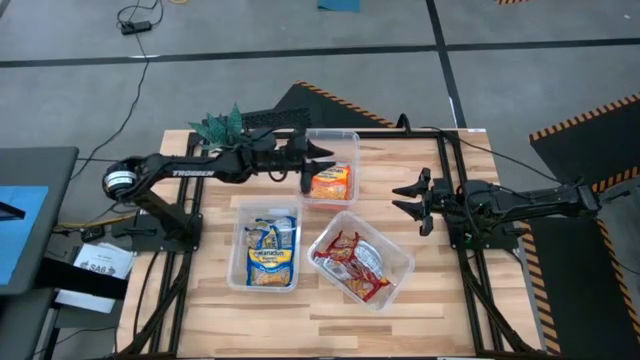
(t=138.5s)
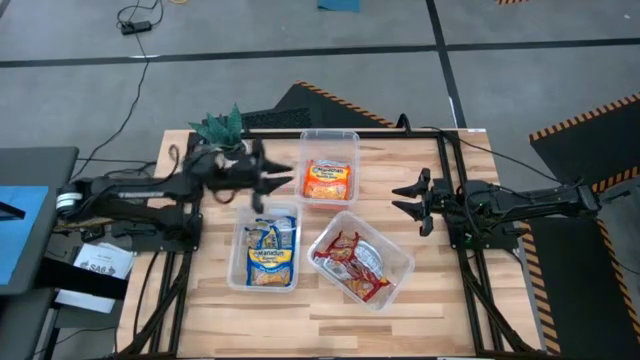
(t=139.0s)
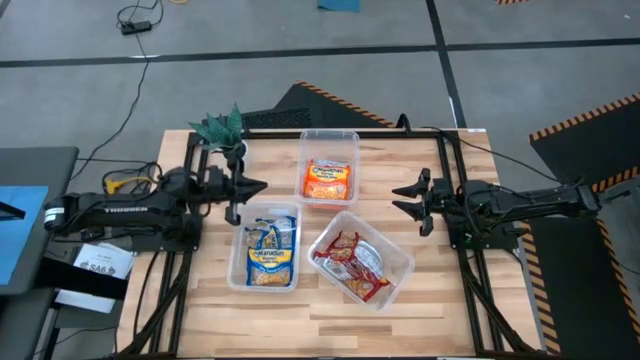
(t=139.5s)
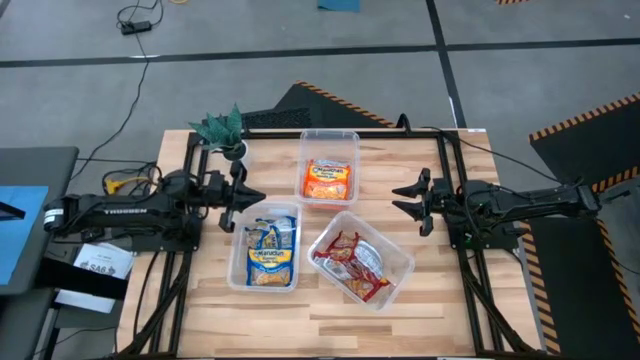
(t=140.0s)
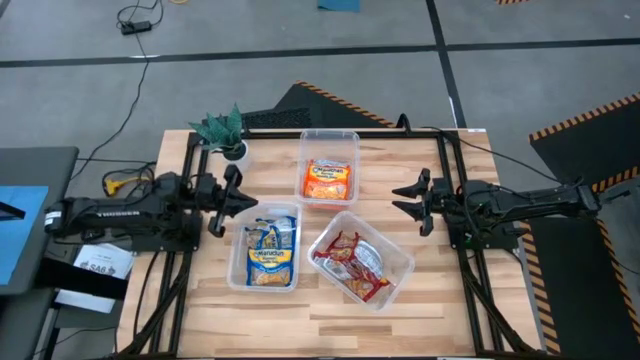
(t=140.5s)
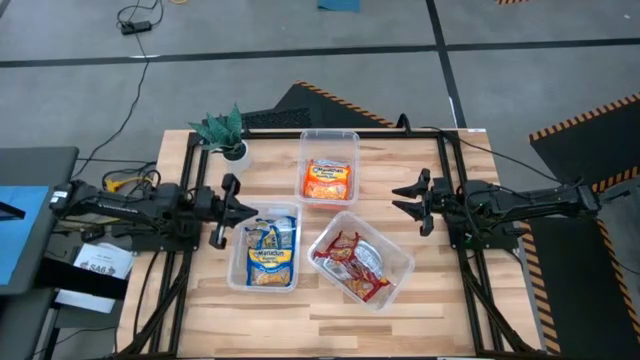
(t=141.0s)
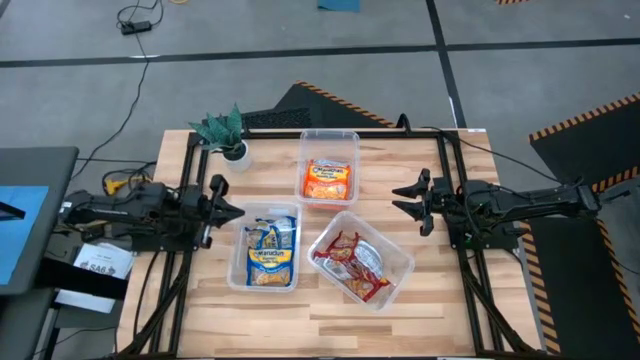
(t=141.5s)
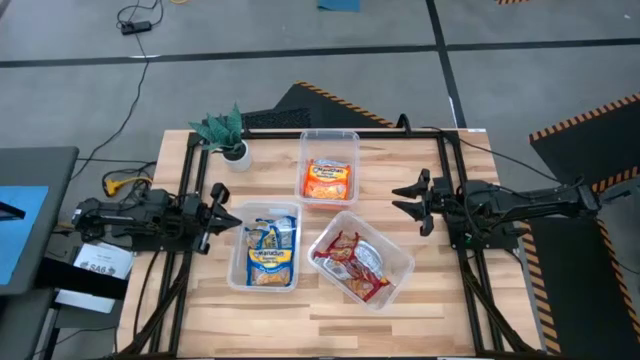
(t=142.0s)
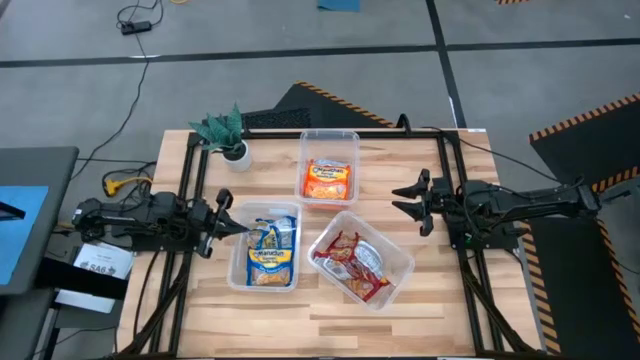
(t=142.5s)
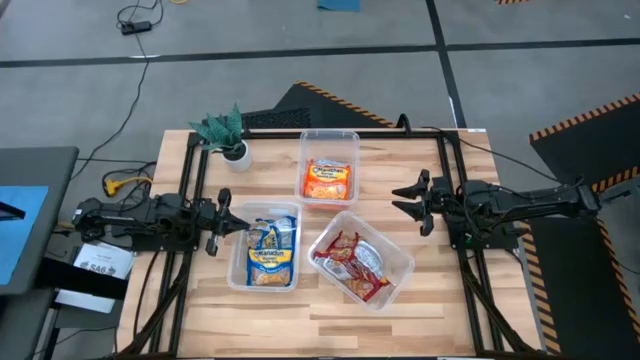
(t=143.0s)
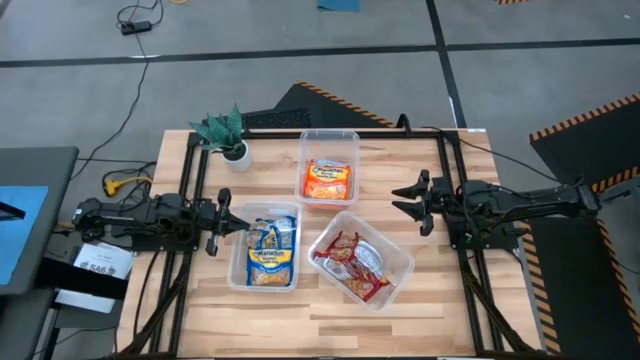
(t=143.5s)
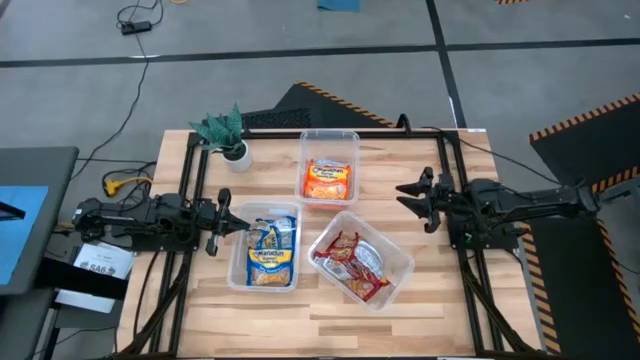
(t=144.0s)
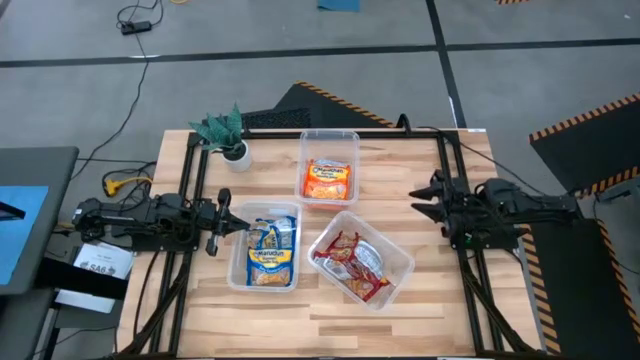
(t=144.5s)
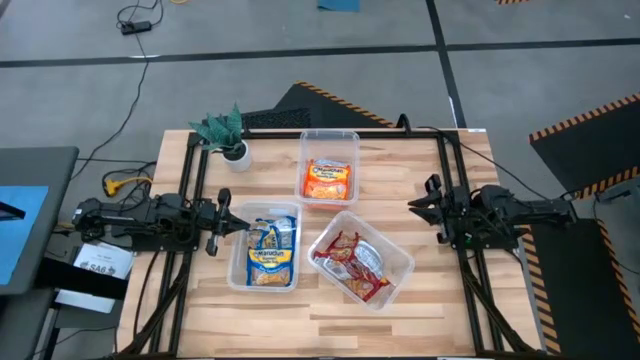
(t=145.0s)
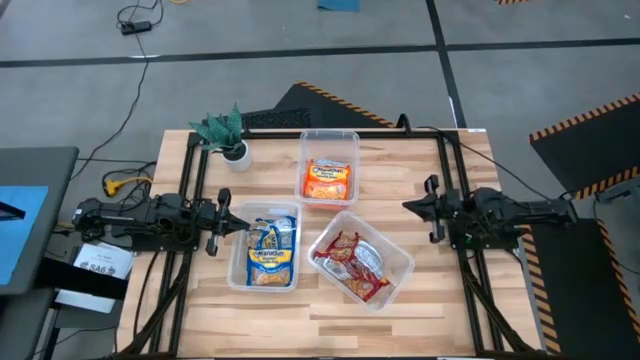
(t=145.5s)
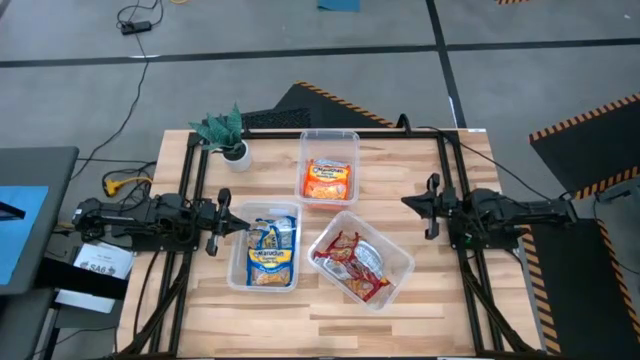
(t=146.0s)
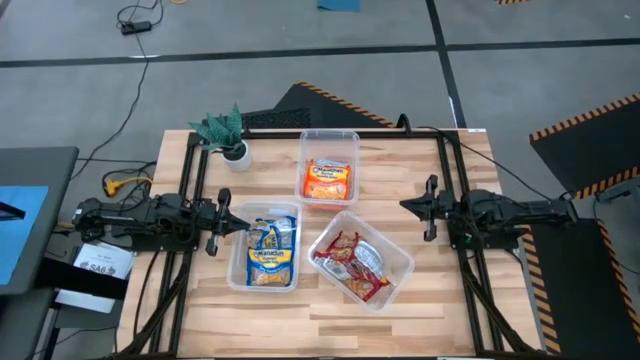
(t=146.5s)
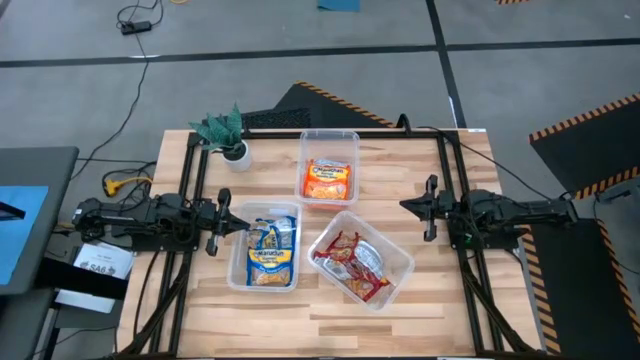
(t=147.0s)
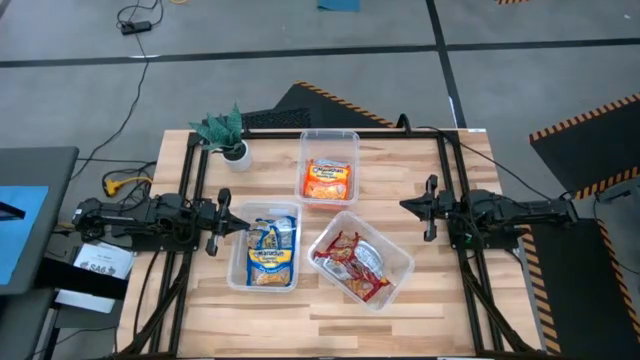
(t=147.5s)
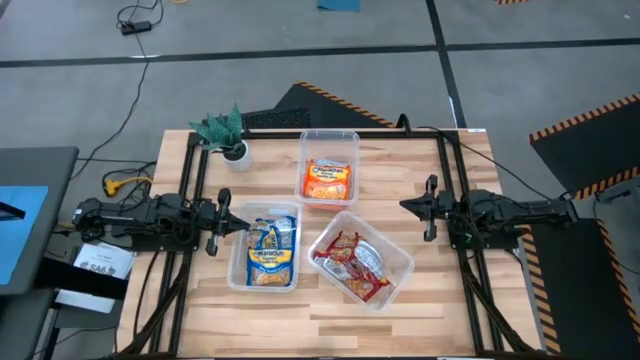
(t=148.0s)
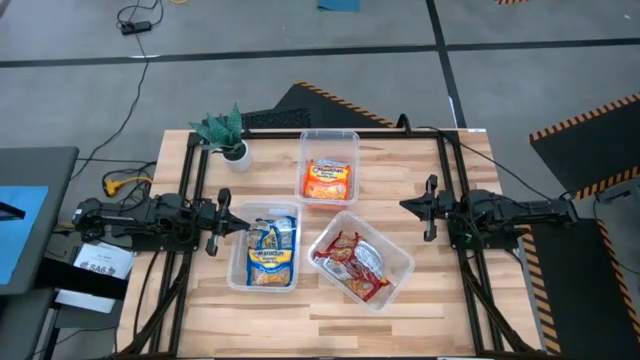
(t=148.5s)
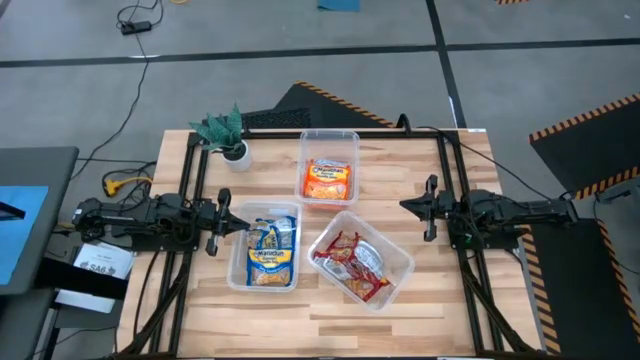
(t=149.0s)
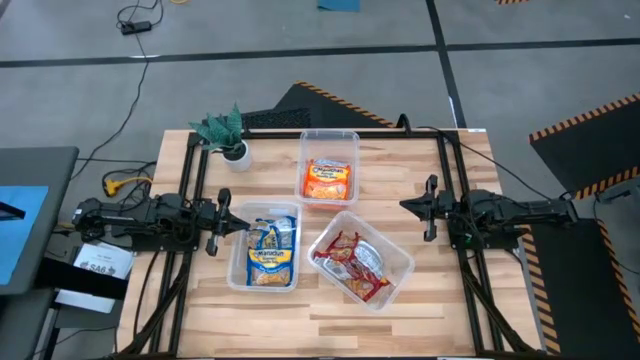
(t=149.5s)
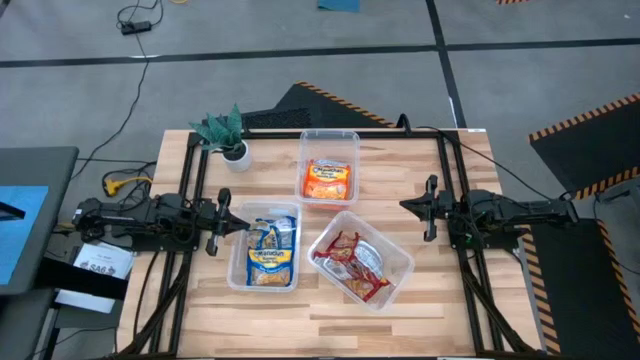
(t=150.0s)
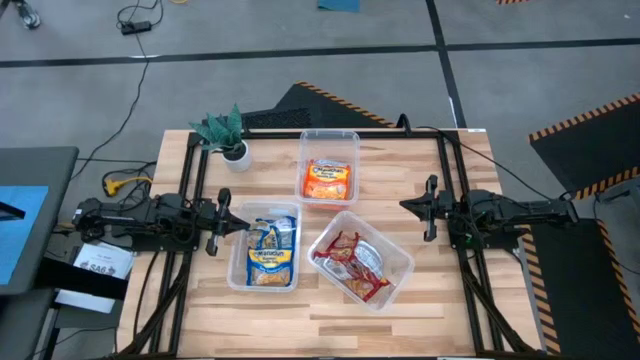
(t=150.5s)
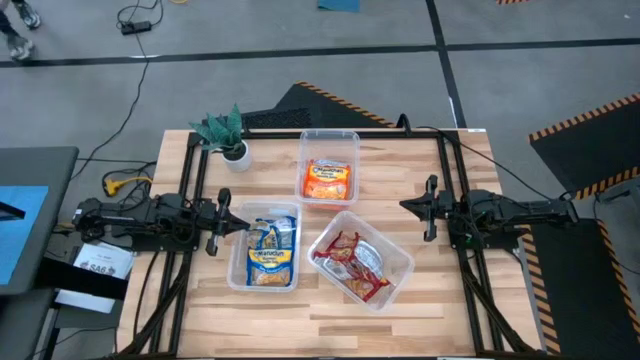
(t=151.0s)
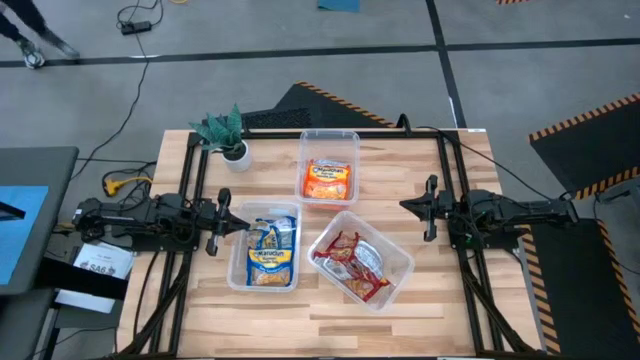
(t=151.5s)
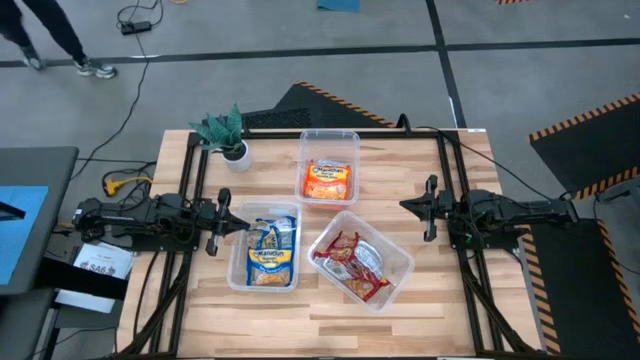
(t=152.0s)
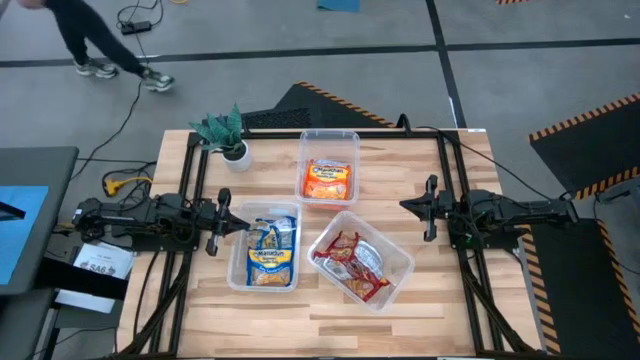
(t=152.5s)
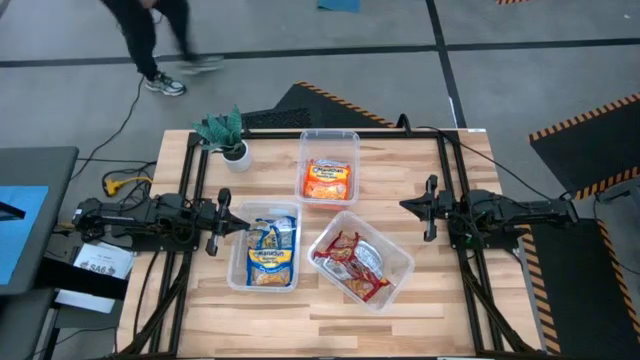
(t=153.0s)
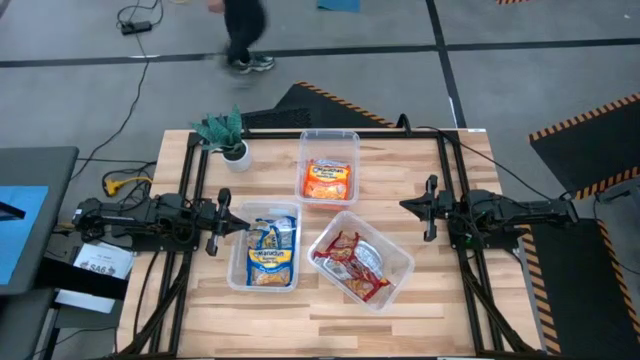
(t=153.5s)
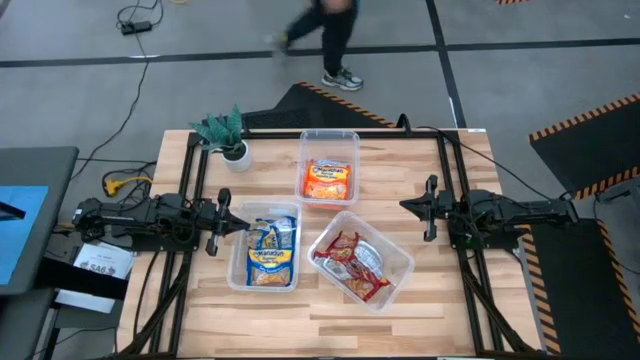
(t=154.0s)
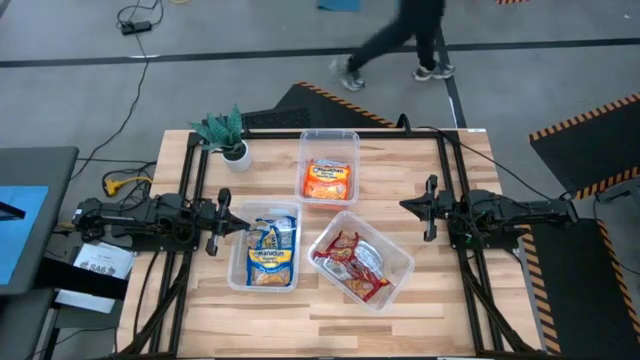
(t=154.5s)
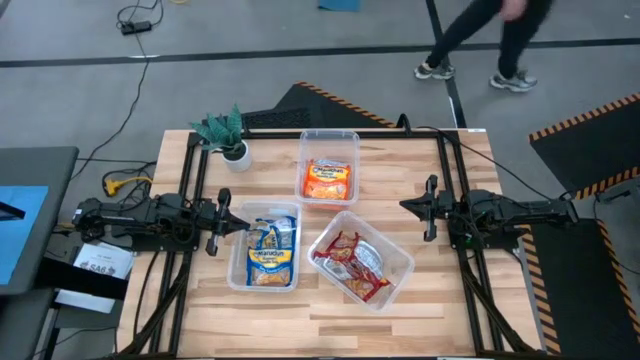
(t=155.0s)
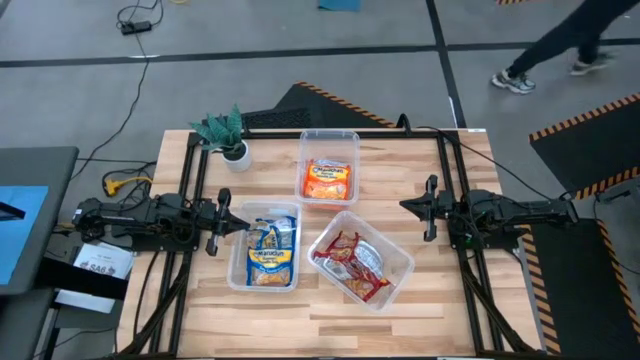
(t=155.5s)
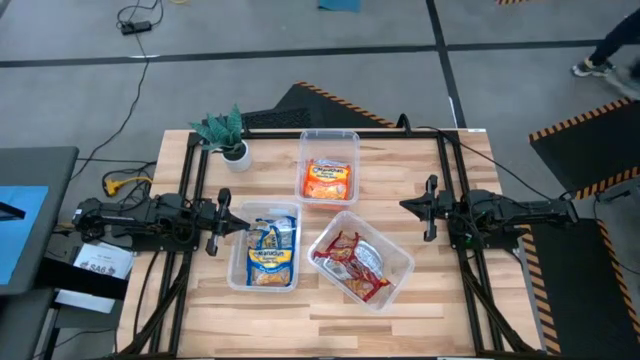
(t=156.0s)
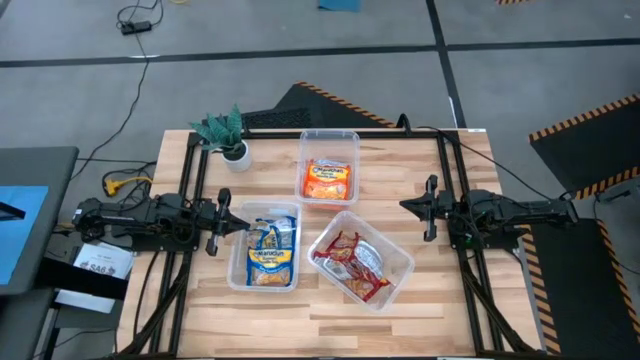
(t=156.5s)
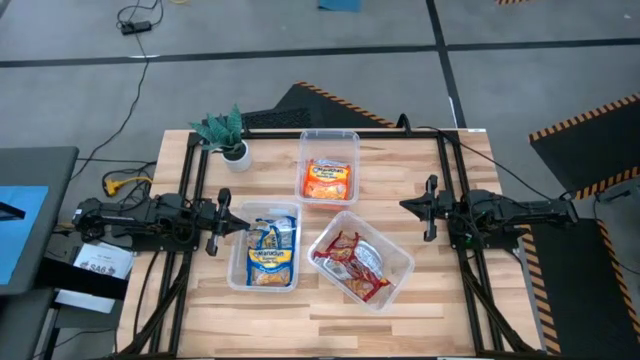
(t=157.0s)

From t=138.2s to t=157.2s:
Task: Sort Maruchan noodles
Return to Home Position

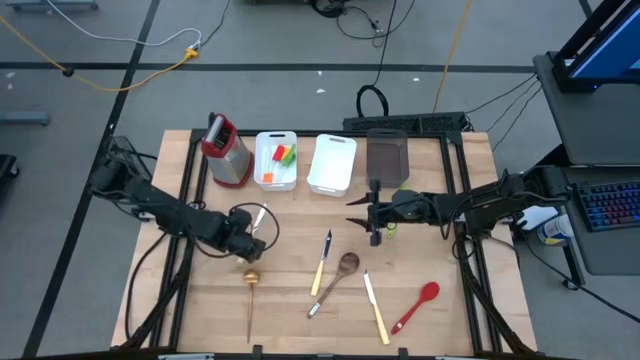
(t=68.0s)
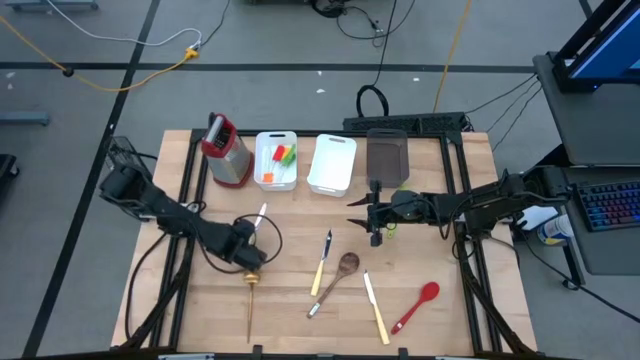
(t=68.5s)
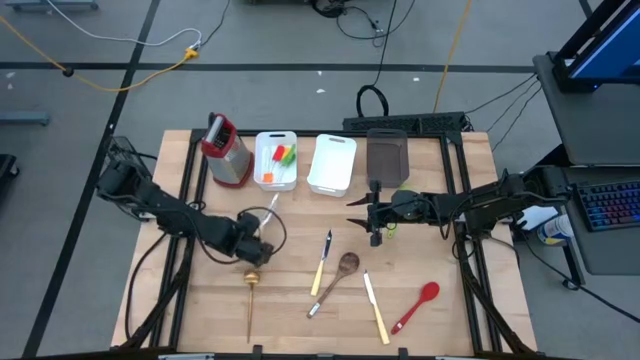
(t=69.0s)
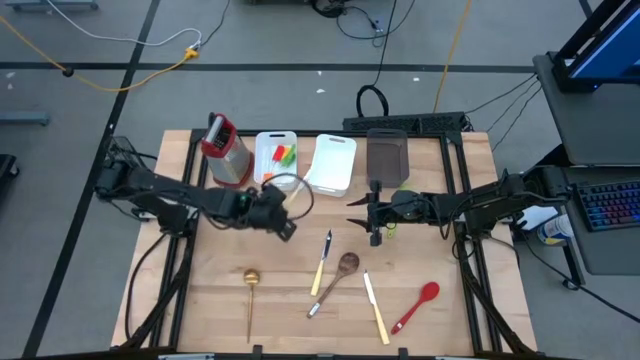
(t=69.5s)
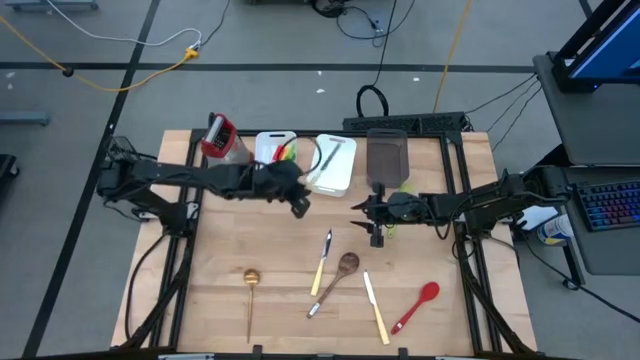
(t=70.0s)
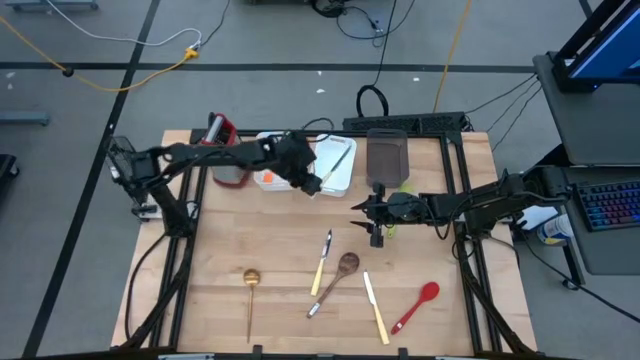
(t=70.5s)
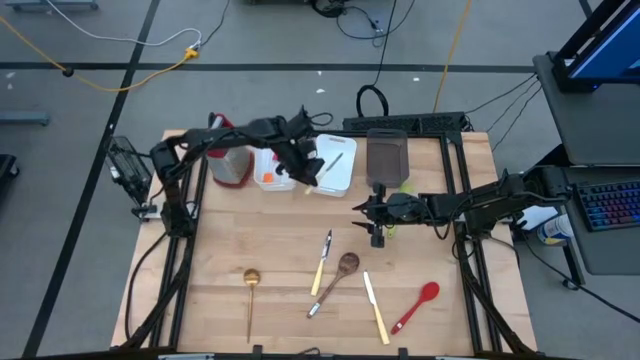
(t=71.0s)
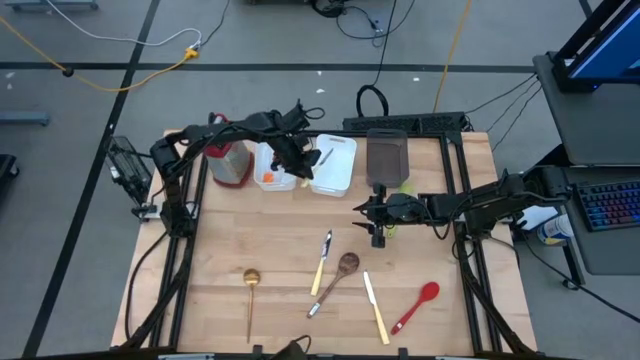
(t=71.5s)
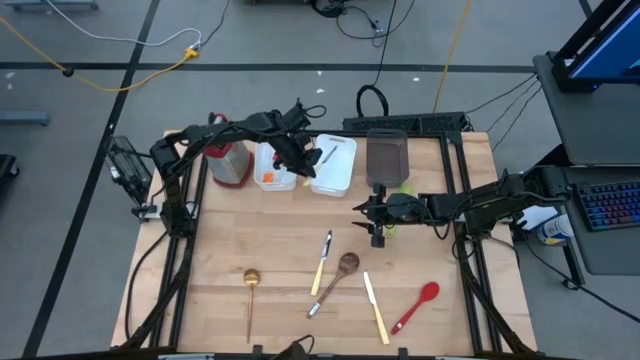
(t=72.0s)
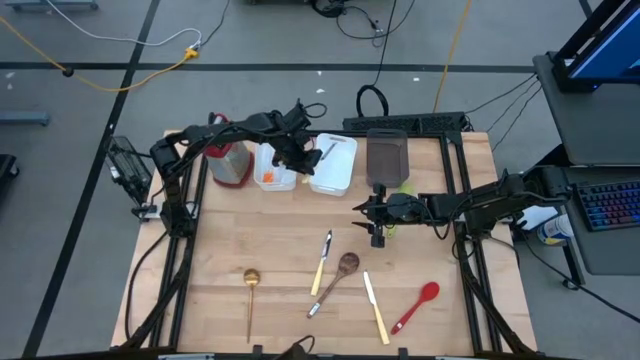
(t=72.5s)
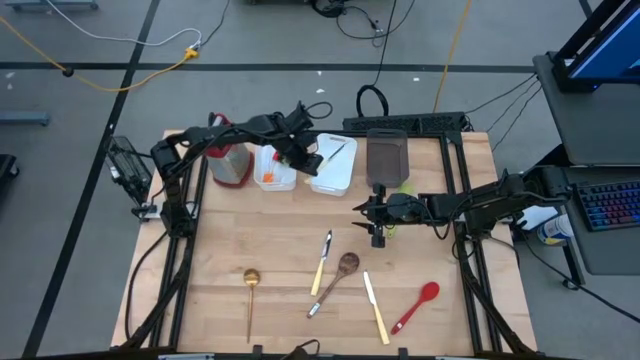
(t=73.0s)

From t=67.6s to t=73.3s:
Task: Pick & Place Kitchen Items
Put the bottom left yellow knife into the right white bin
